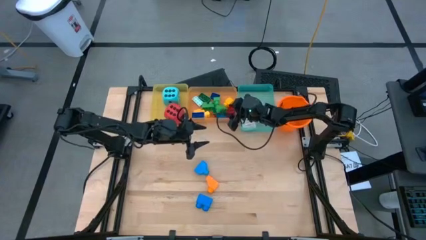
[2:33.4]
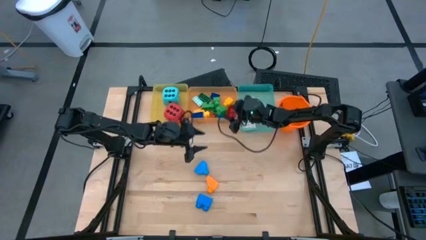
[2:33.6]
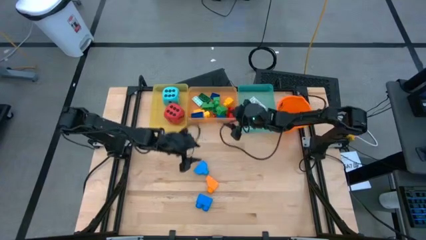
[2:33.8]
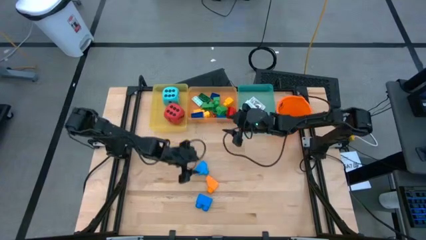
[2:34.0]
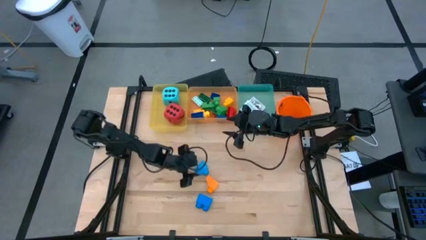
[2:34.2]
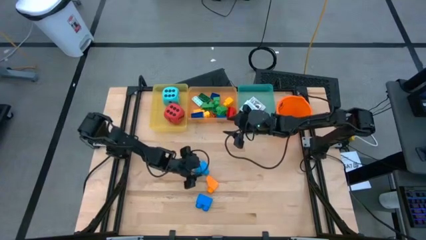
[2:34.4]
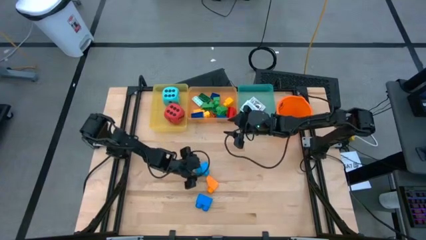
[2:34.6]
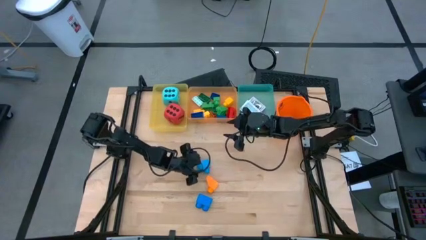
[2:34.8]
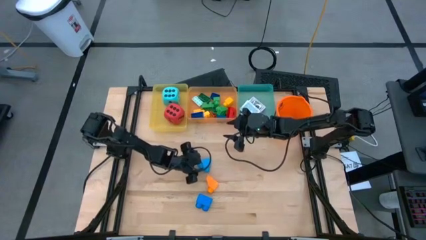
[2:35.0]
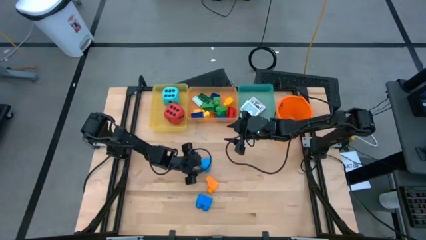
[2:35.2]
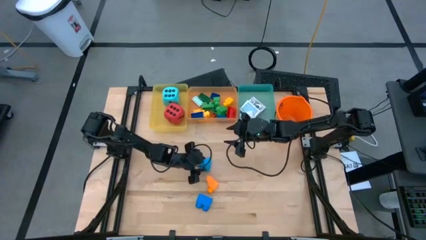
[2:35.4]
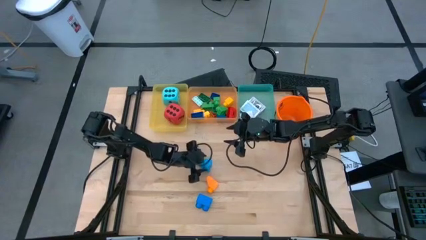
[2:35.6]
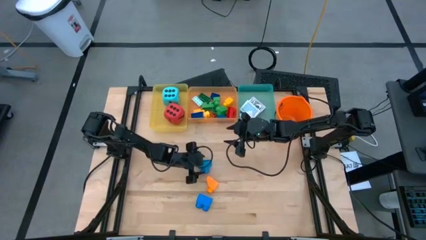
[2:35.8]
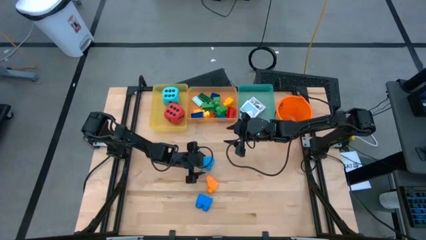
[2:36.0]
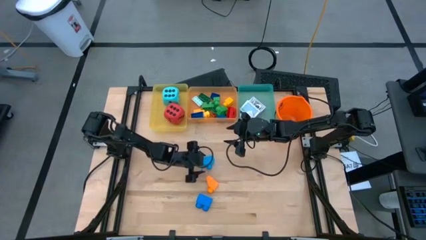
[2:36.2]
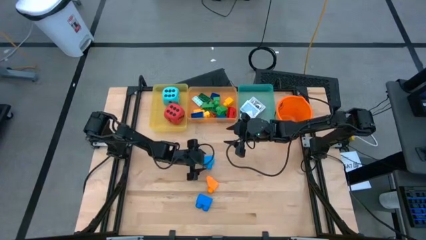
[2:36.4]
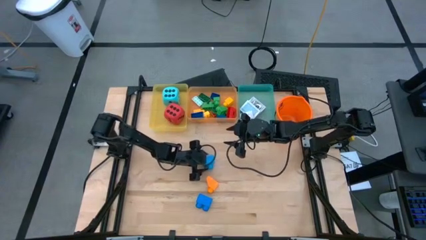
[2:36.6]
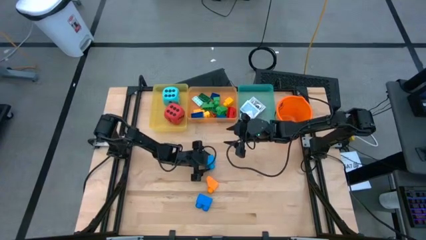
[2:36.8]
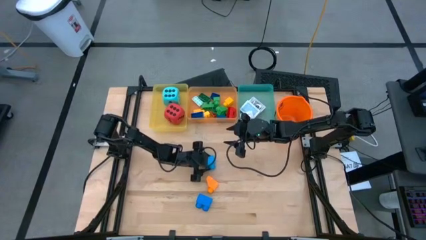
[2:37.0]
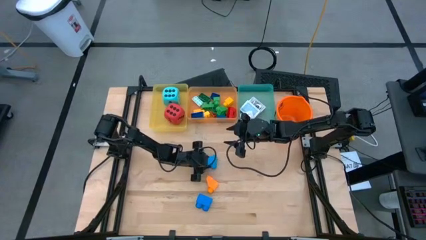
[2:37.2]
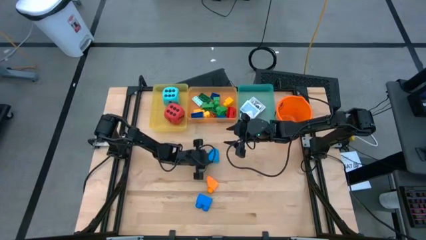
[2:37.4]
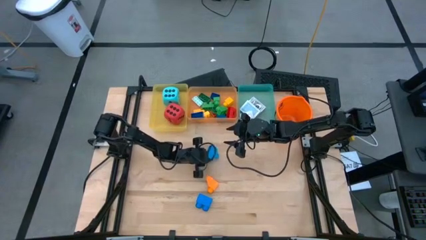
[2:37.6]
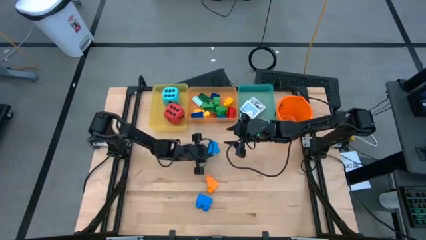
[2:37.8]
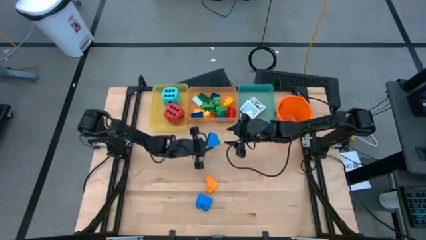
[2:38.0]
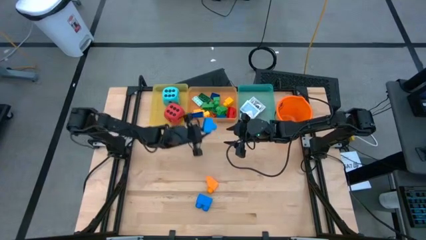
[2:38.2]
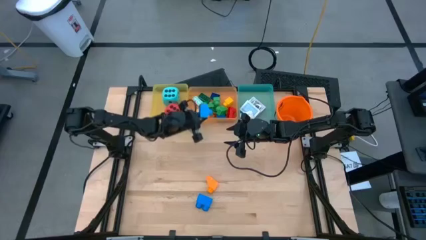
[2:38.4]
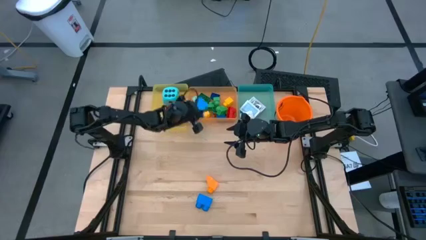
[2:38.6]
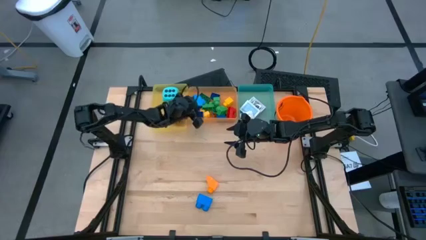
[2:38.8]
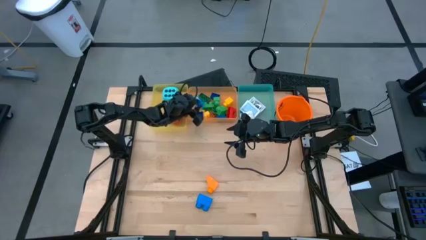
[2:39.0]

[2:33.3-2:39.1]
Task: Pick & Place Toys
Put the blue game piece into the orange bin

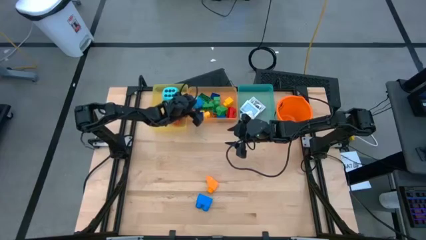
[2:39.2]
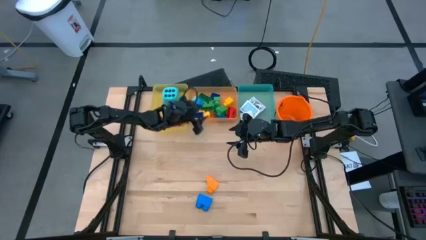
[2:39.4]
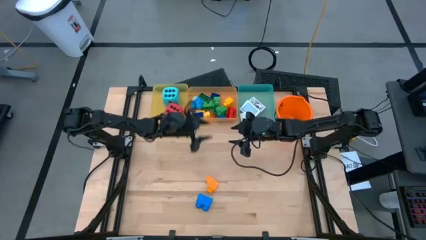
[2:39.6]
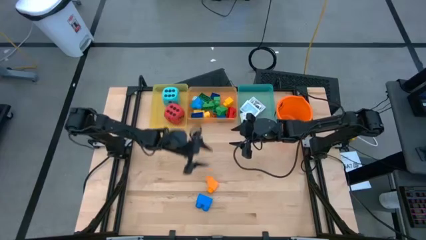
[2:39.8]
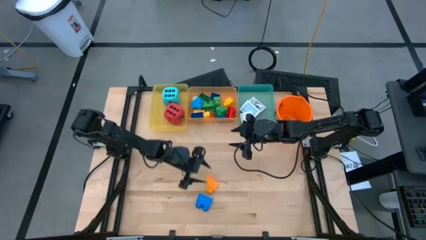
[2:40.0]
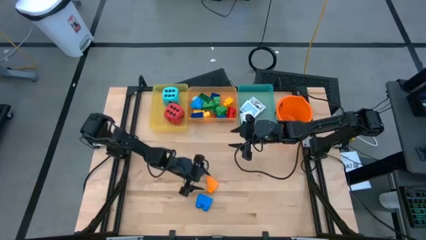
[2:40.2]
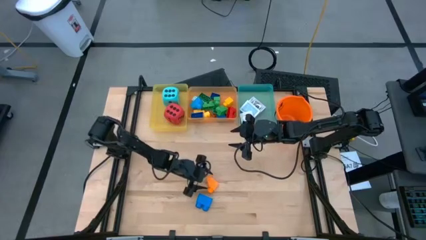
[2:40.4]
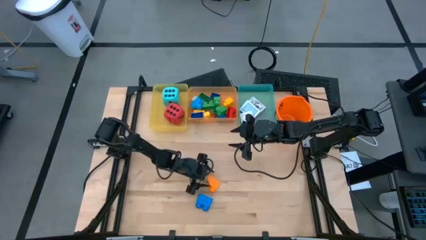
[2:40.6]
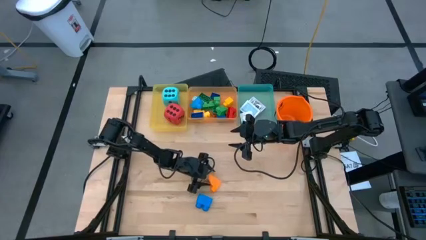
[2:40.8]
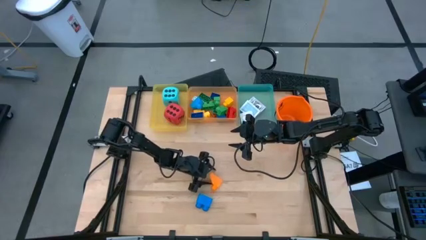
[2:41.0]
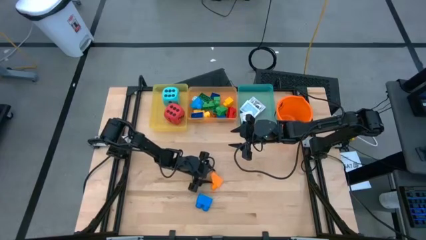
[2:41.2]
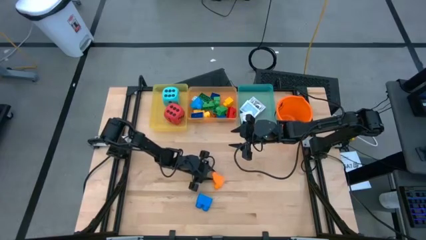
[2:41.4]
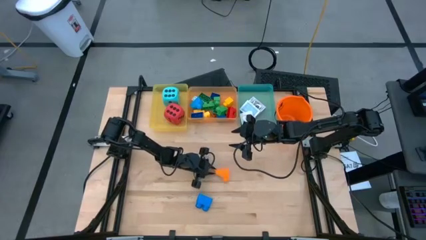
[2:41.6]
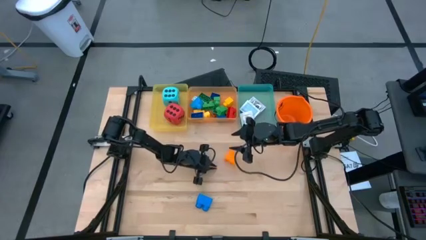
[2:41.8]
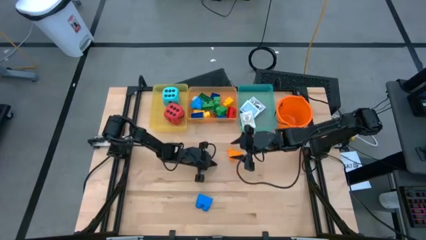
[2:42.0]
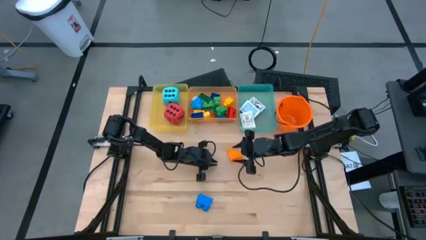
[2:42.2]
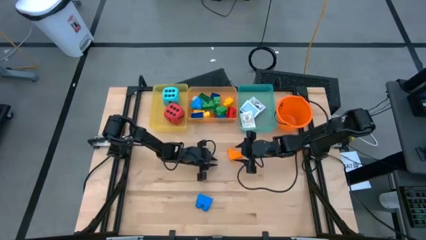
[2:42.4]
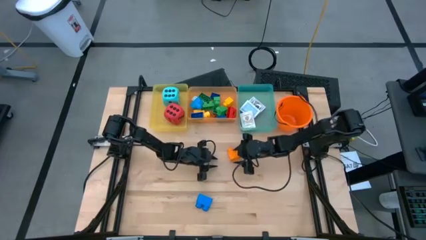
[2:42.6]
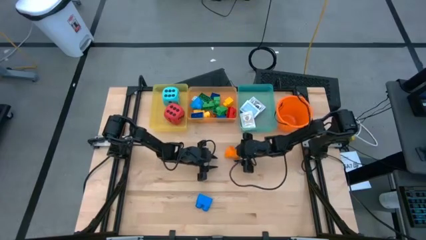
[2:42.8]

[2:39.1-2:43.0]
Put the orange game piece into the orange bin

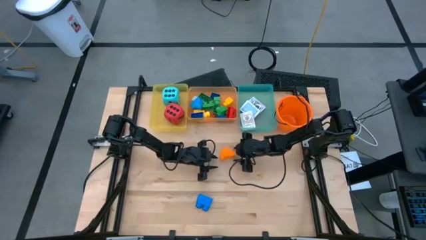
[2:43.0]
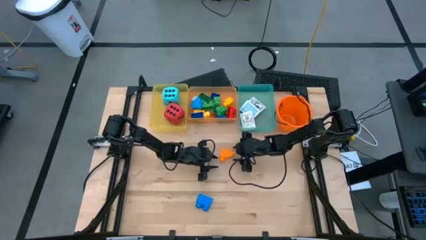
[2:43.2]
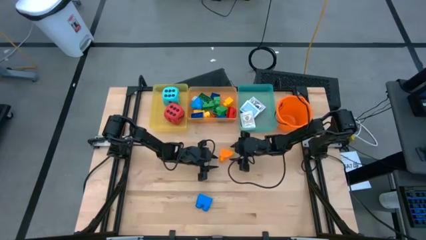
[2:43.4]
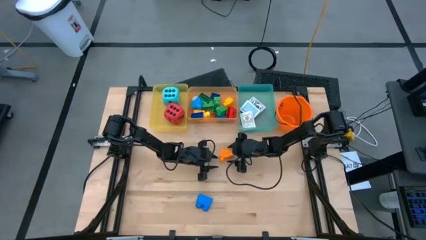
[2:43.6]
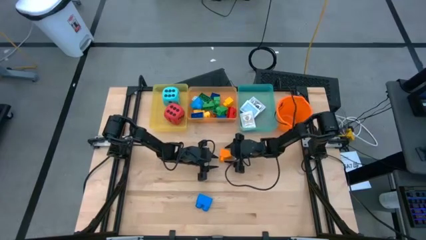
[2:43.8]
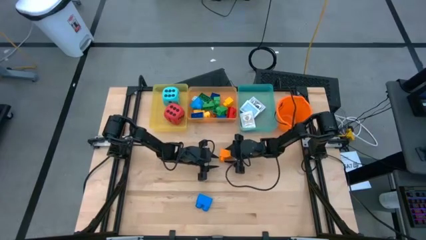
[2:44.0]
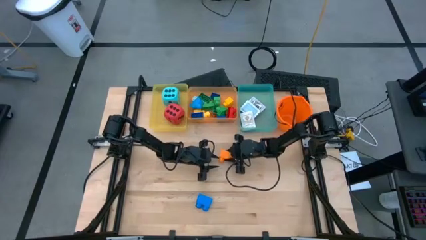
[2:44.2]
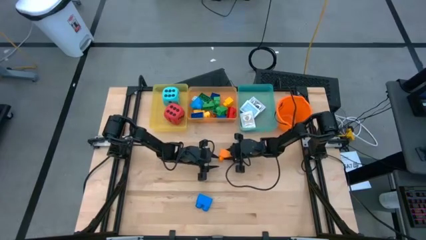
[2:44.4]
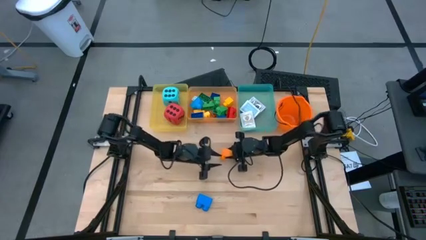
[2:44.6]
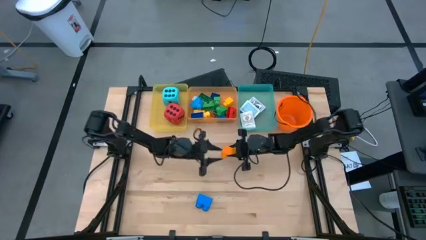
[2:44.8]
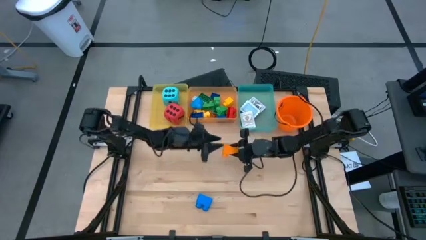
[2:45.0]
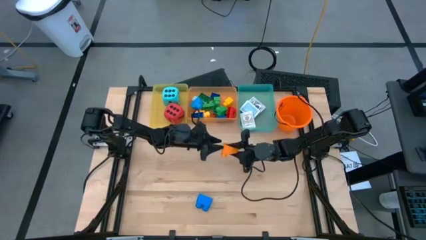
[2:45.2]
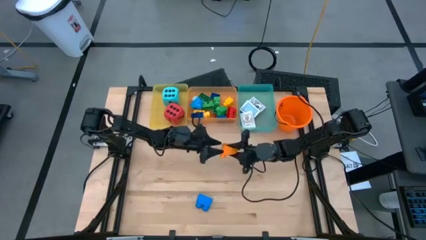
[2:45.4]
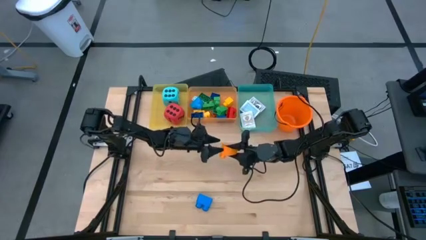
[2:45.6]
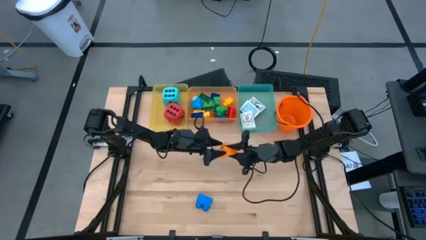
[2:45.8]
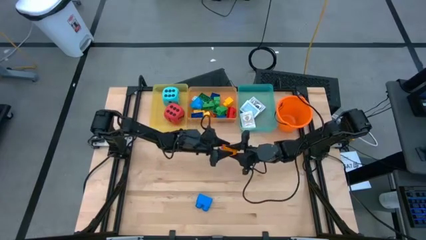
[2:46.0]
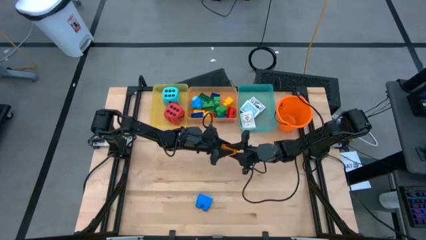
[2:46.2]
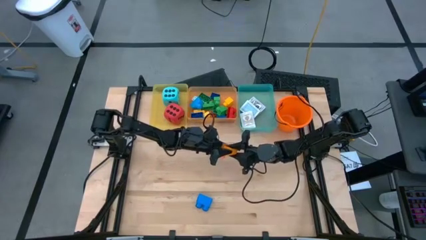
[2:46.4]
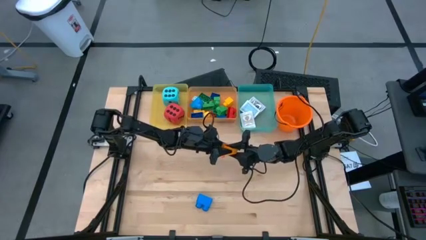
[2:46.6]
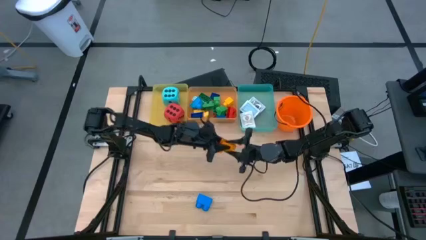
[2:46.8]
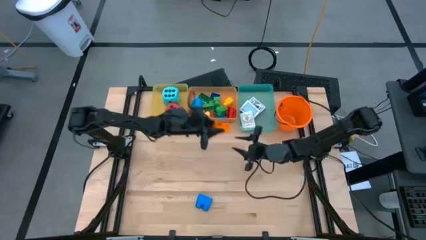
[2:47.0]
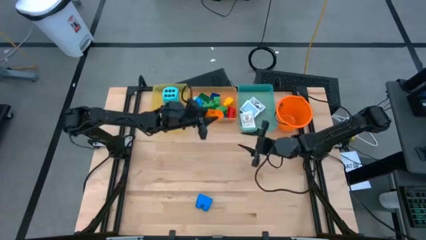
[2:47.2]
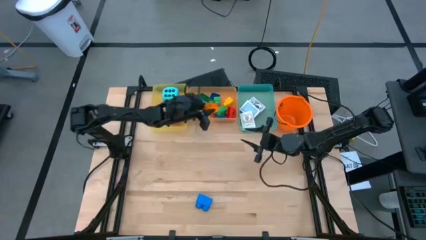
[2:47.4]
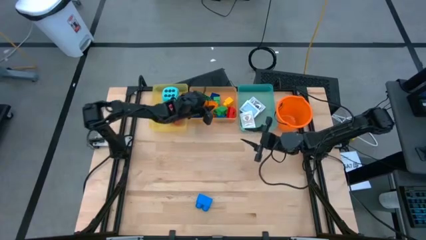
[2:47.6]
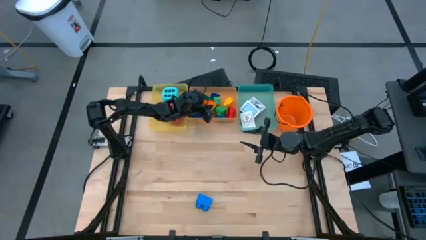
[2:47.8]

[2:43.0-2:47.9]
Put the orange game piece into the orange bin

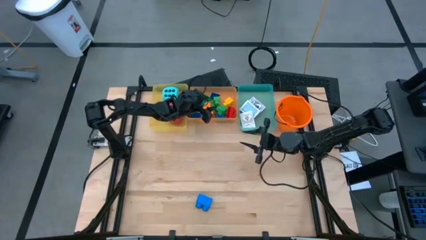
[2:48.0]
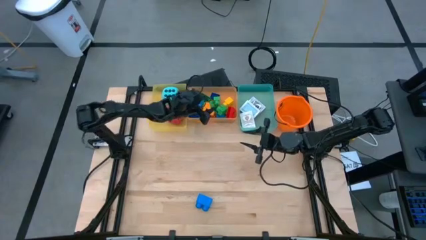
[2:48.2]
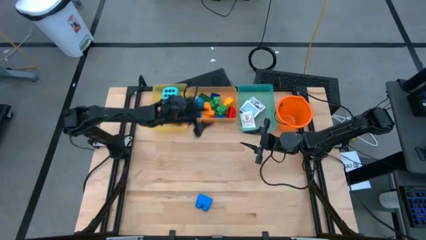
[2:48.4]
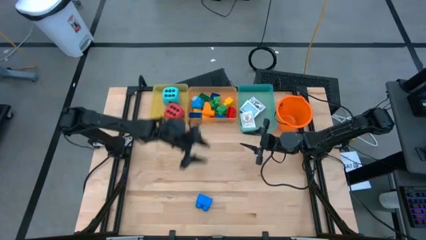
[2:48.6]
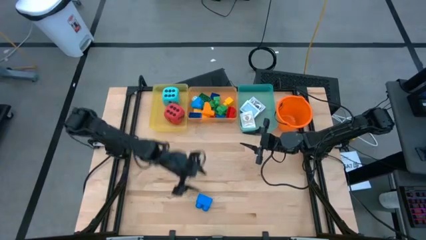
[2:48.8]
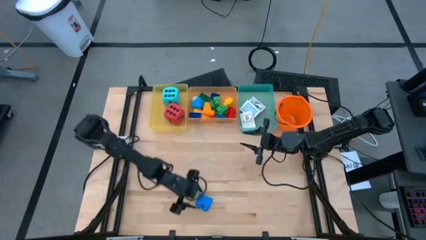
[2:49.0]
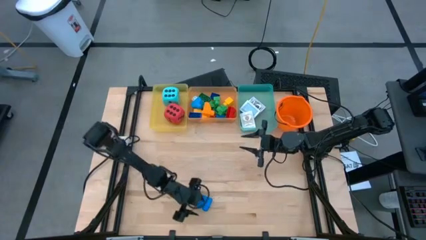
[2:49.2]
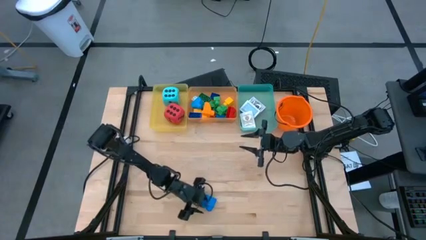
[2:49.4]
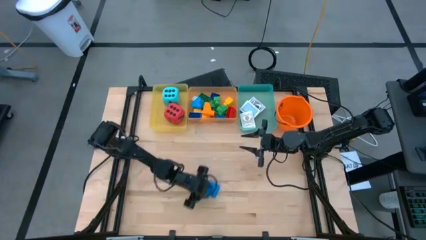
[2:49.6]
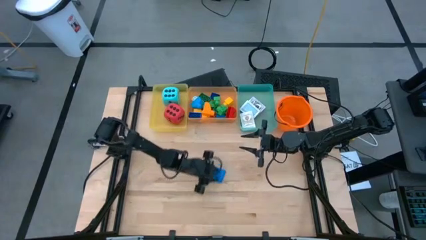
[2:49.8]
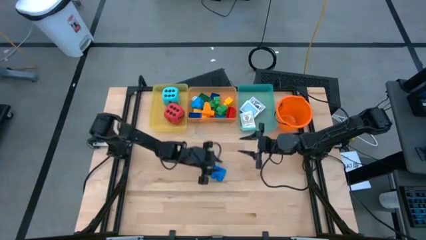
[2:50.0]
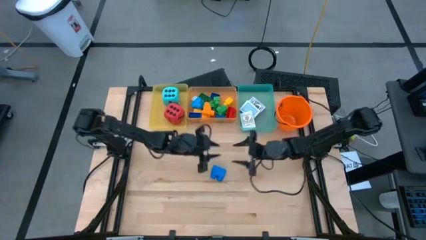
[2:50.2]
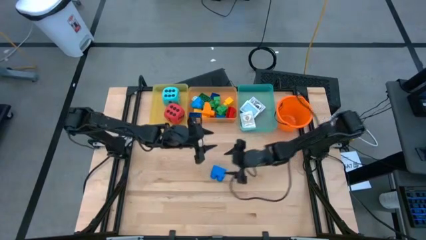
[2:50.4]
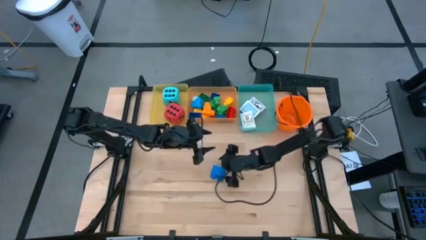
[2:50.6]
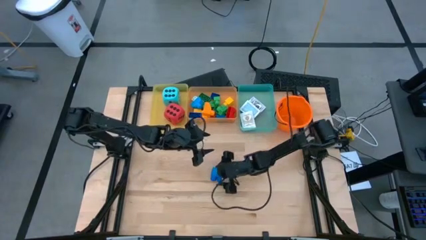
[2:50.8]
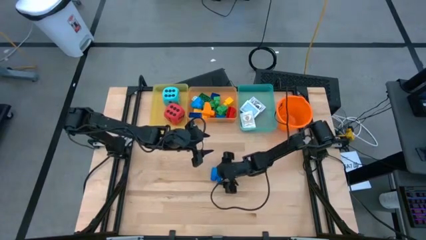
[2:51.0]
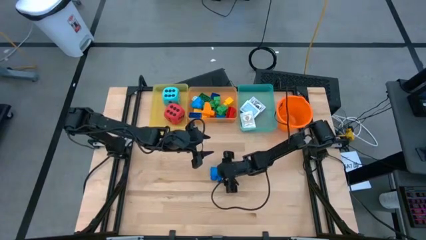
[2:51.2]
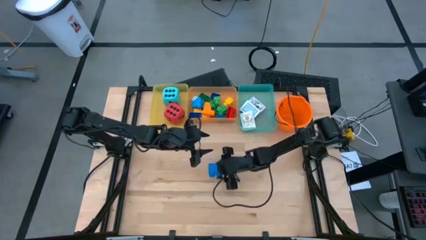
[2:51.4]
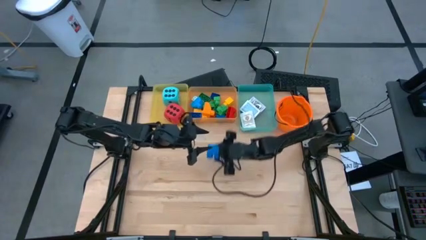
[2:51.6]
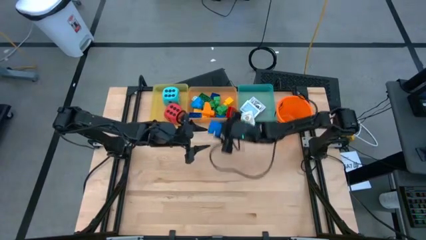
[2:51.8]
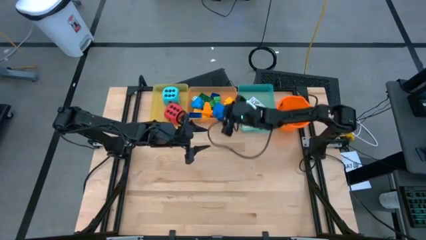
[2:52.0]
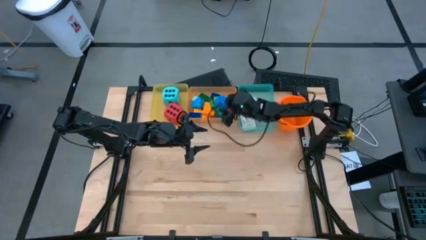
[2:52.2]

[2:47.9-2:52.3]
Put the blue game piece into the orange bin
